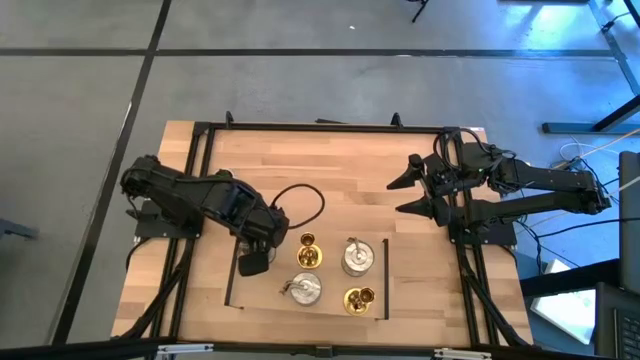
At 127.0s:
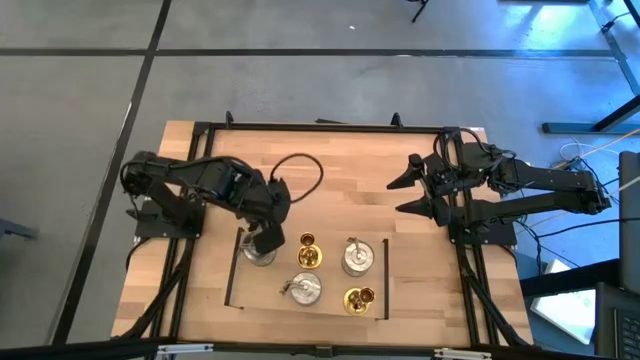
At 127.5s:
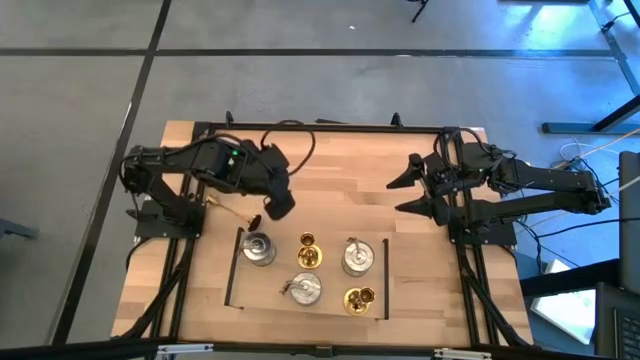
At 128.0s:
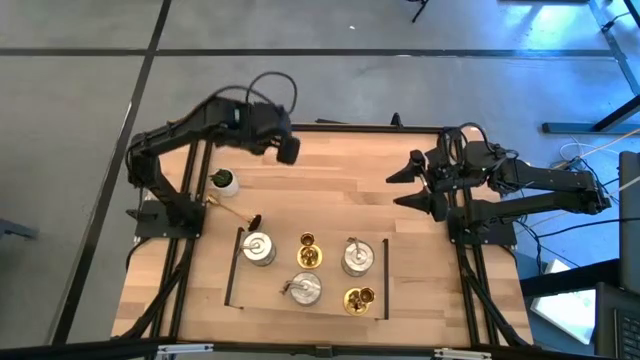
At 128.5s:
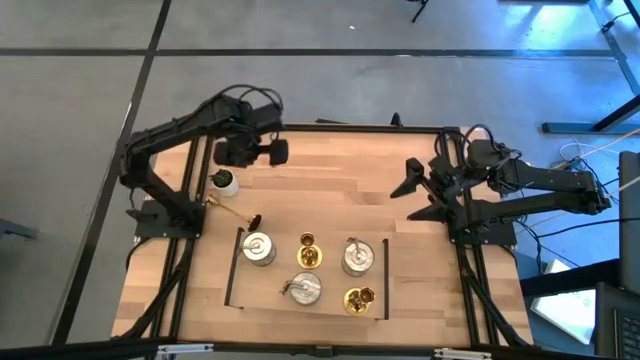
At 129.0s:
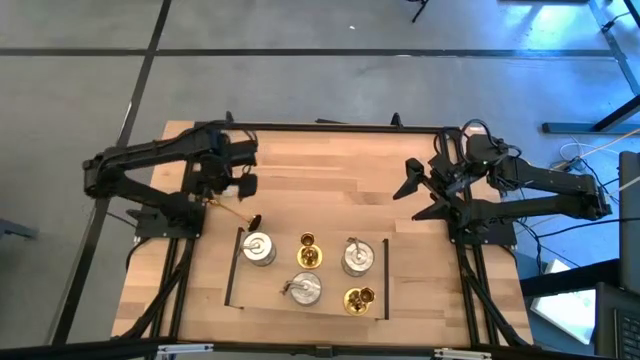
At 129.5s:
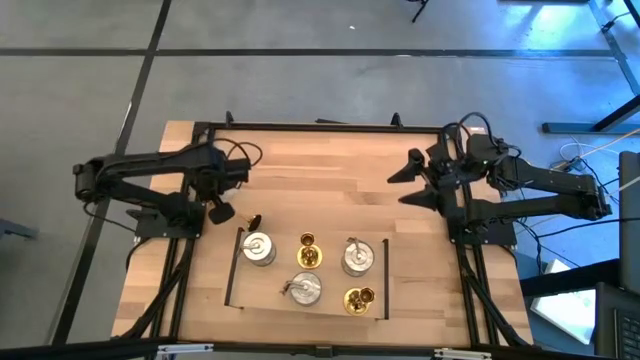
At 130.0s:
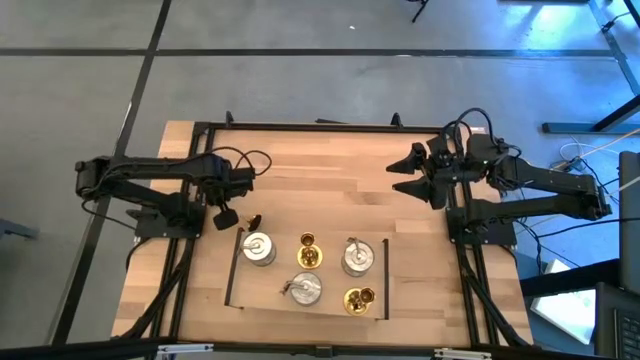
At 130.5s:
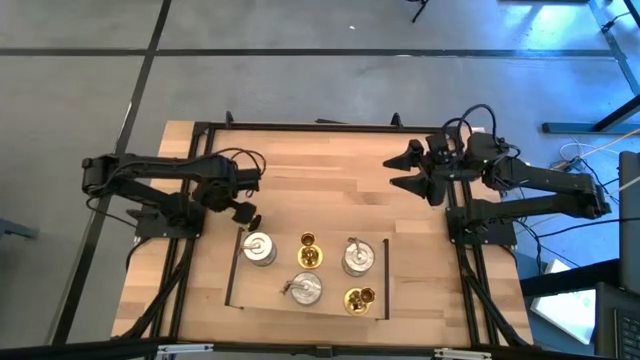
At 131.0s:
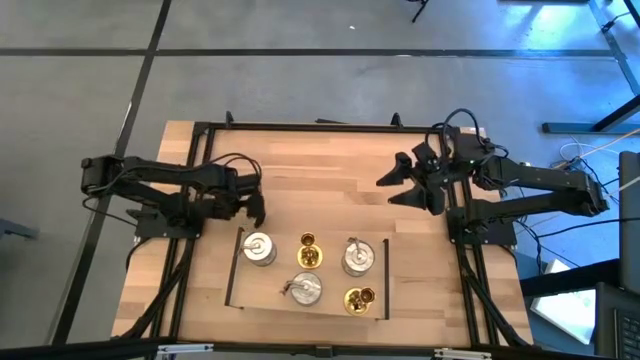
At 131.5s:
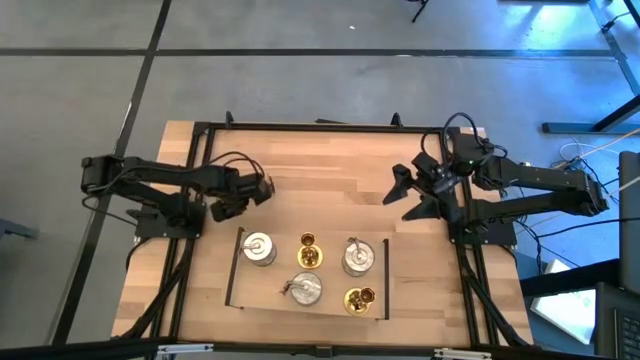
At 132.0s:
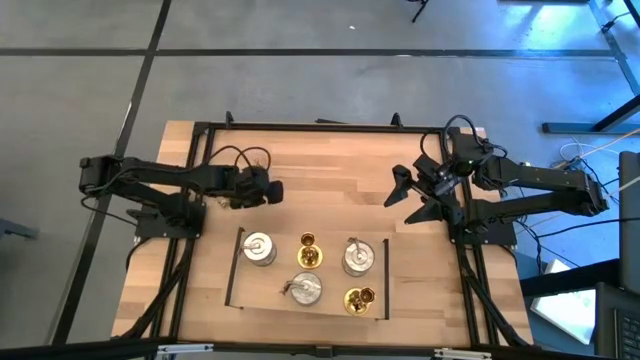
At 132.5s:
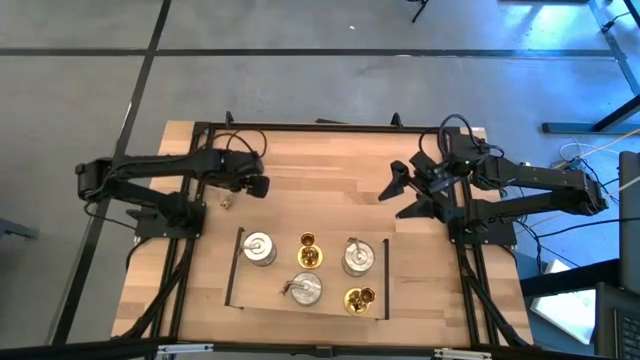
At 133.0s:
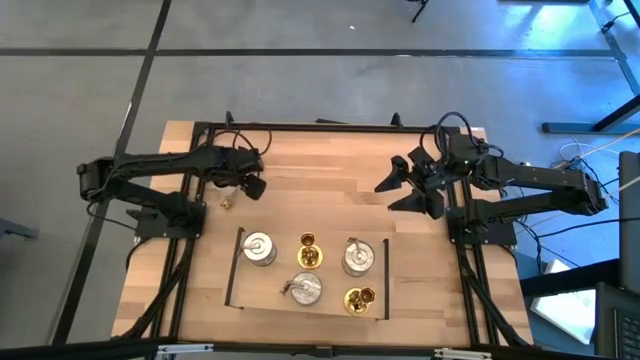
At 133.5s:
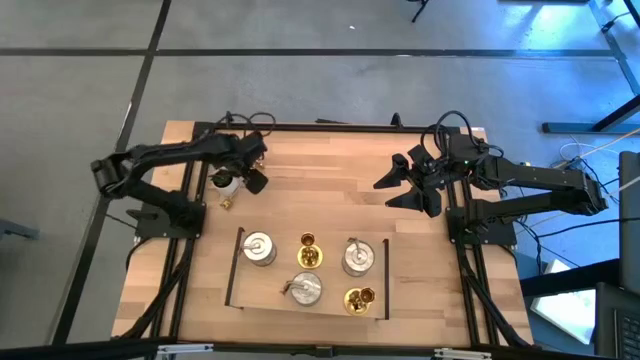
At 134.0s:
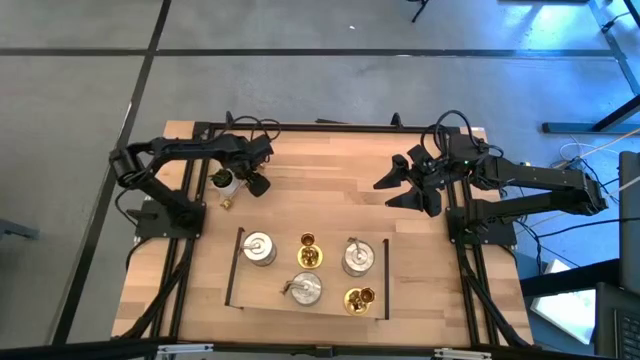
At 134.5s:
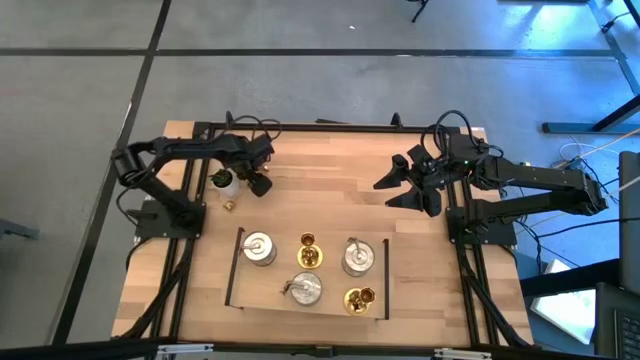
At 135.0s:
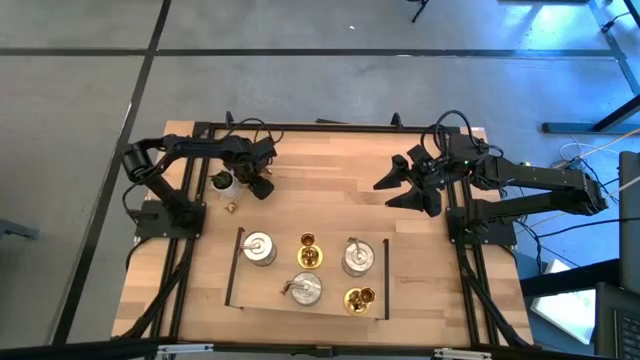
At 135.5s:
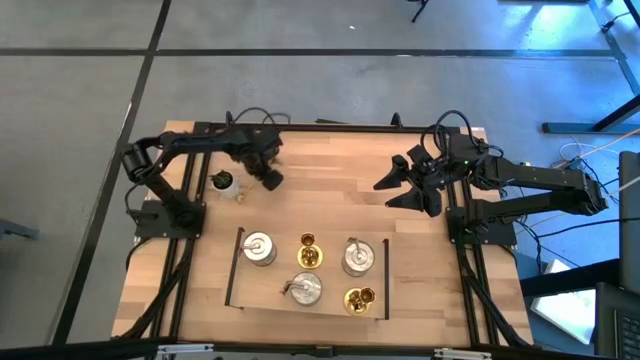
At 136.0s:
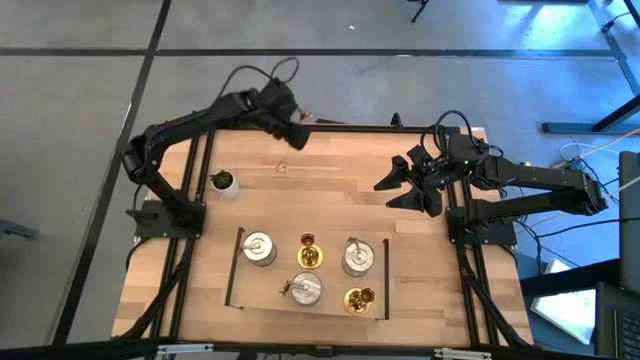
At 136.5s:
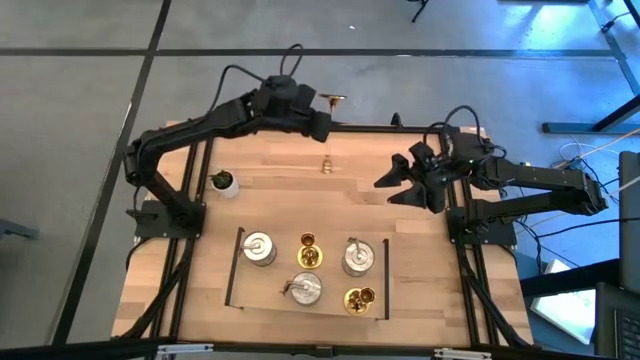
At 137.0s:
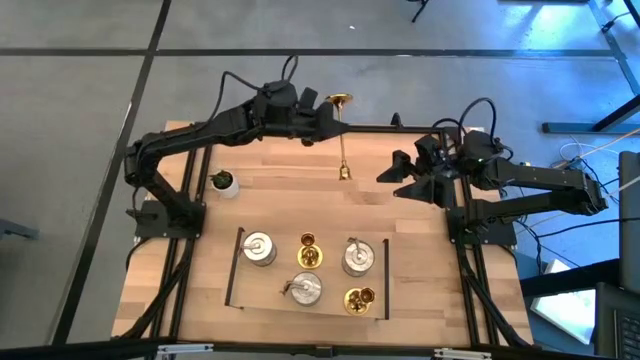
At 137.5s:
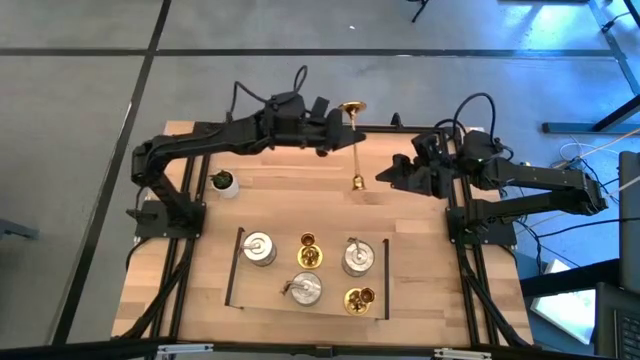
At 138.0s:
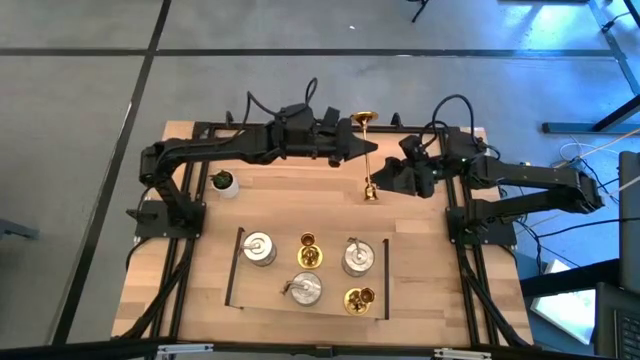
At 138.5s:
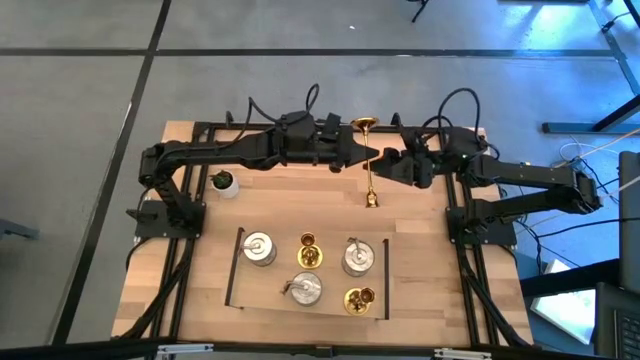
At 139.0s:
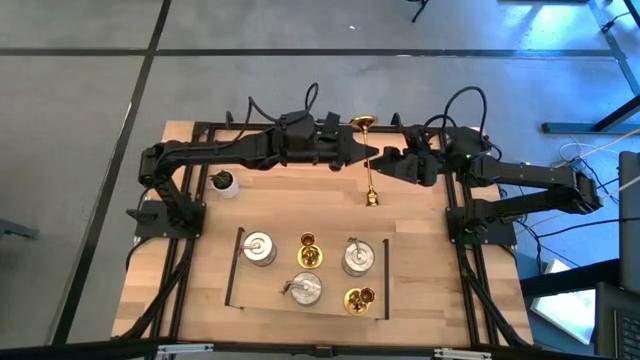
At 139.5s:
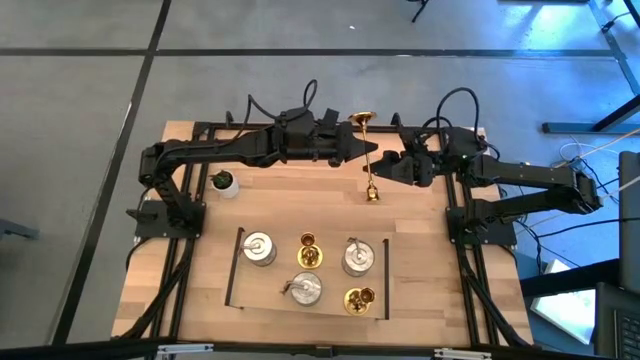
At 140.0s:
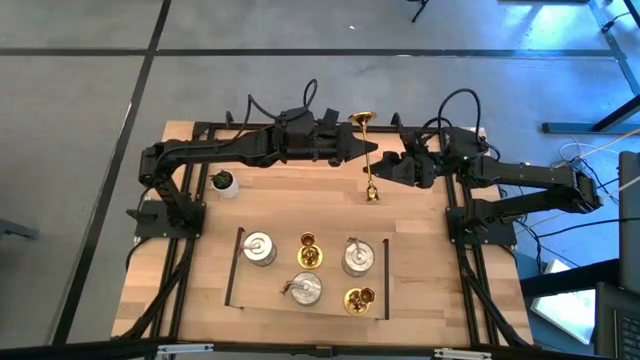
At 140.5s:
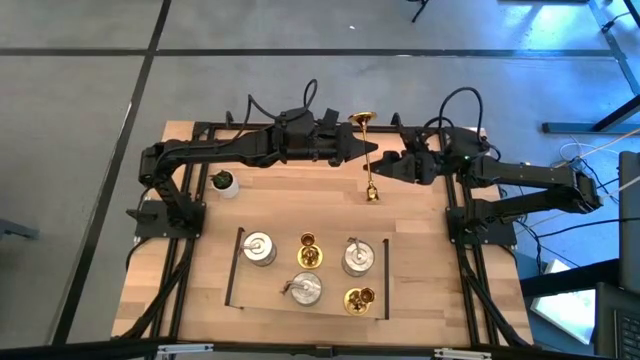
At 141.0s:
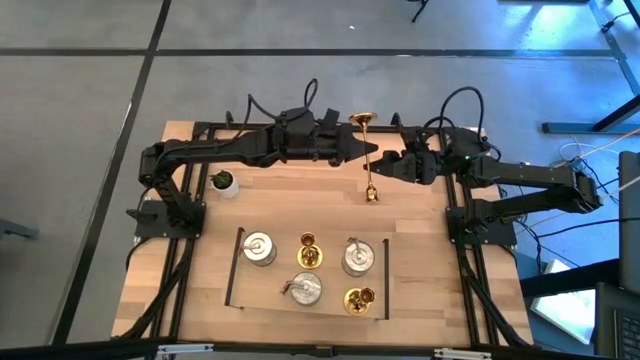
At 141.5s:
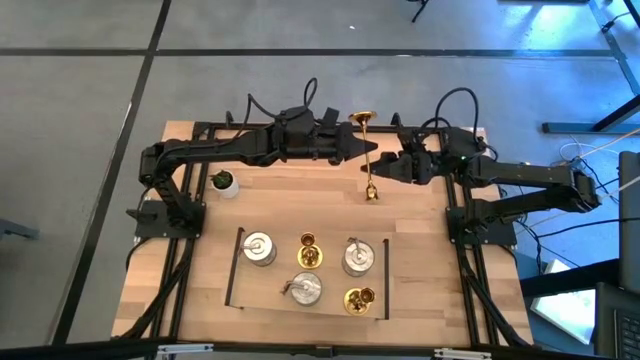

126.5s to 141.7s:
Task: Pick & Place candle stick holders
Put the gold candle holder on the shelf

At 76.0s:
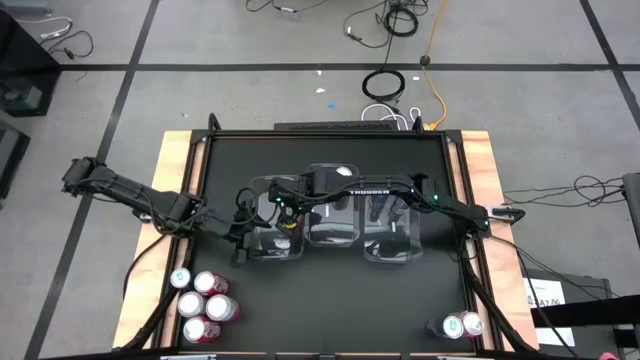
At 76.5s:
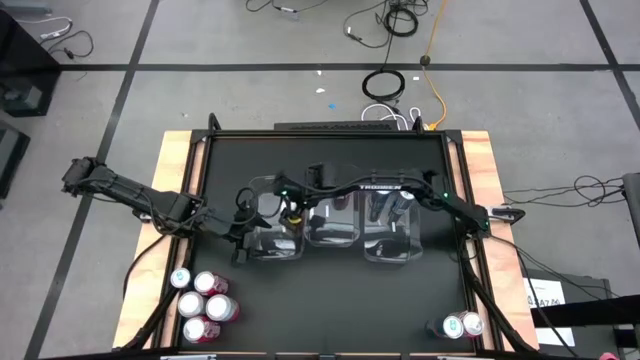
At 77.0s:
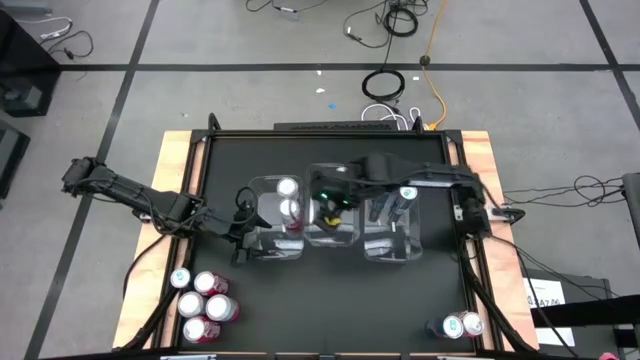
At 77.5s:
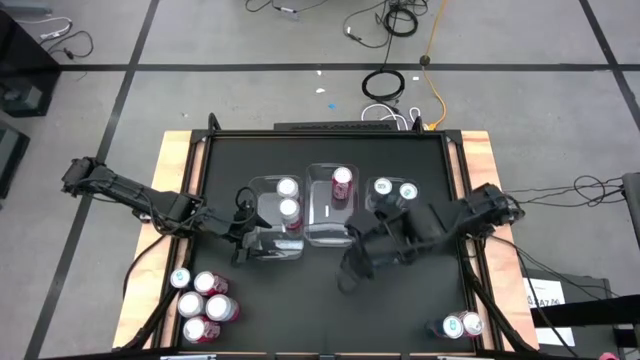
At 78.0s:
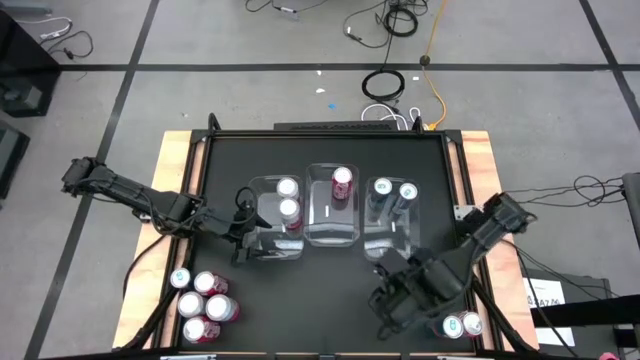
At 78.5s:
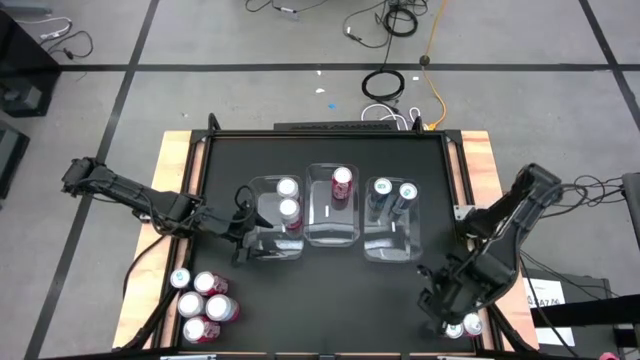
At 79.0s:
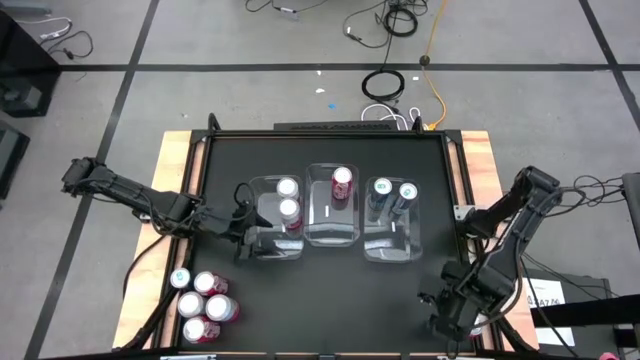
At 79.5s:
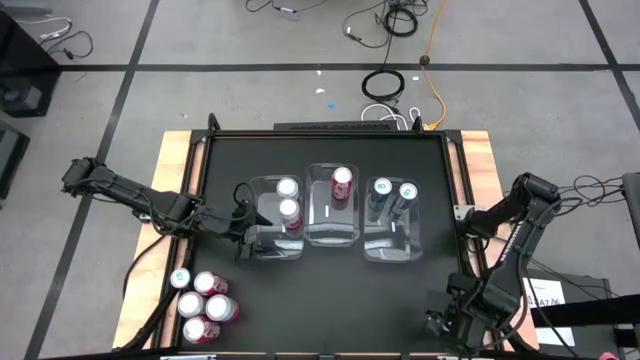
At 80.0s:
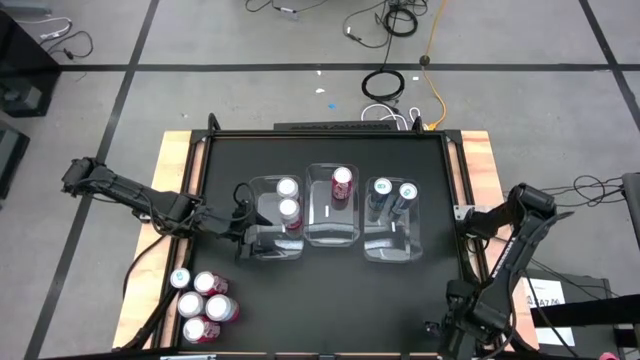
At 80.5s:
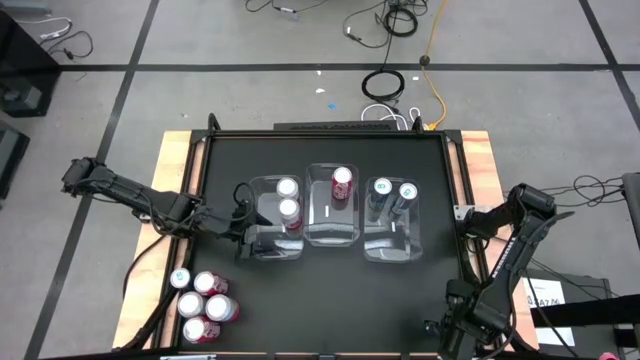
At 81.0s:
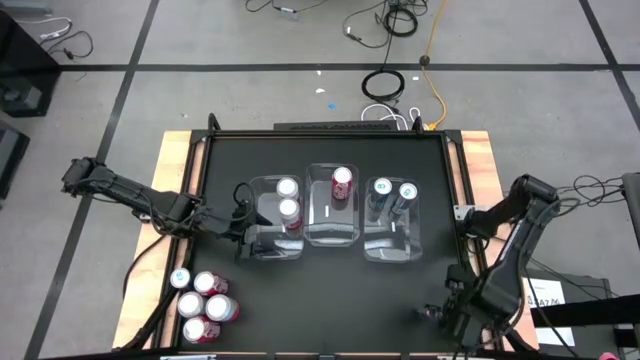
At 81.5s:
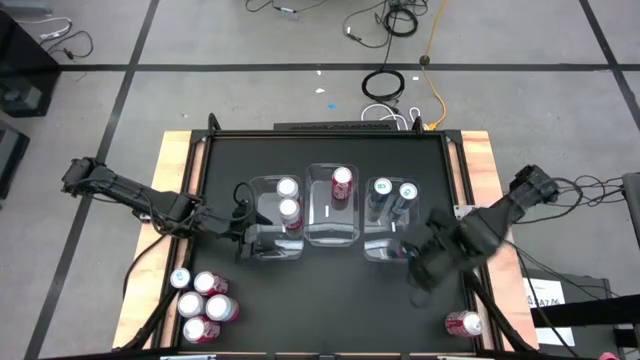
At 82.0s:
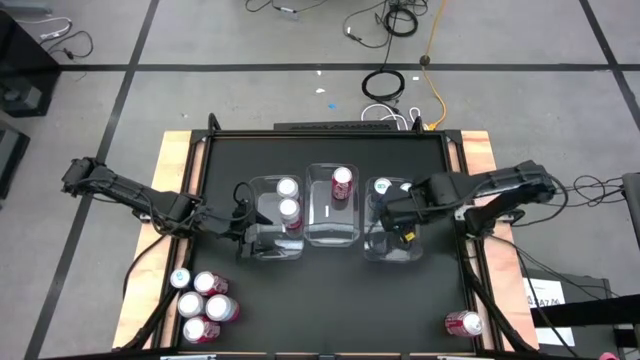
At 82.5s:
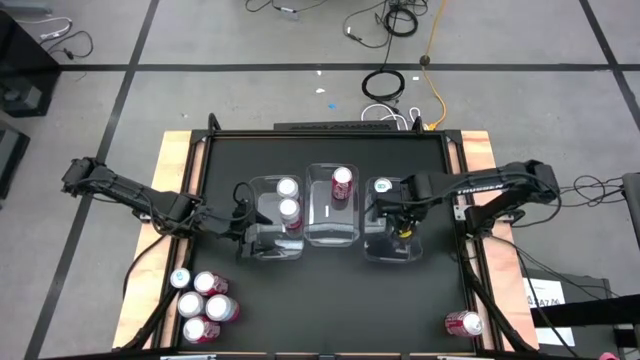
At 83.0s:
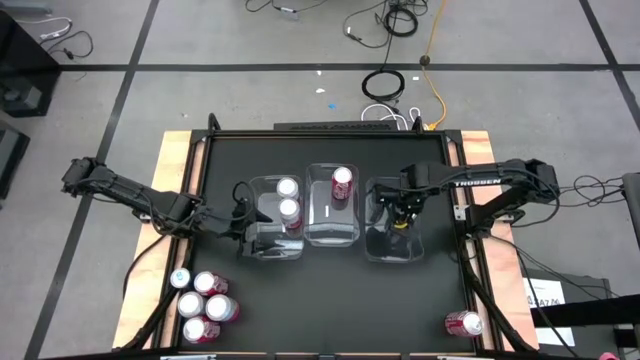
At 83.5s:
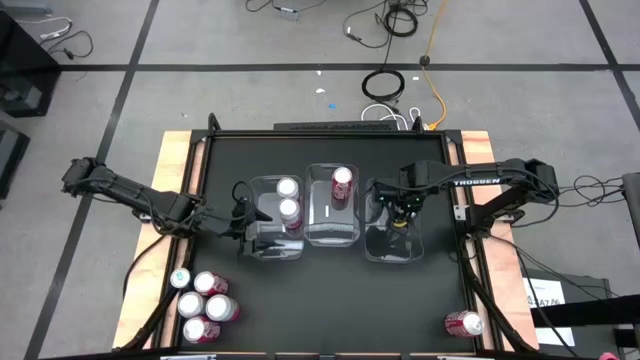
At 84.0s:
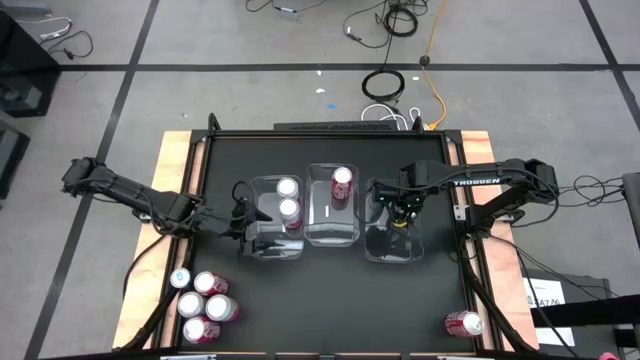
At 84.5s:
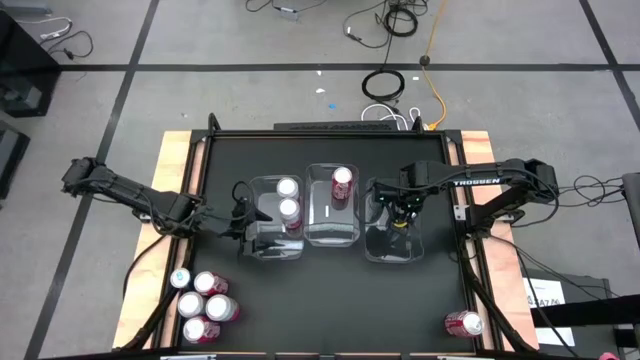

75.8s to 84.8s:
Task: Sort soda cans
Put the right silver blue soda can into the middle right transparent bin
